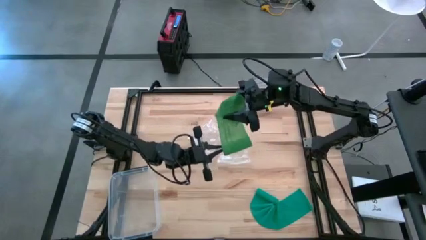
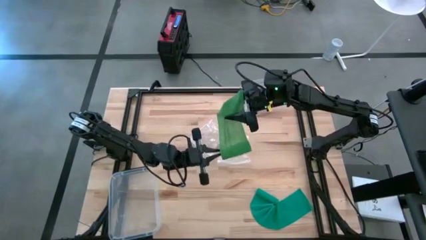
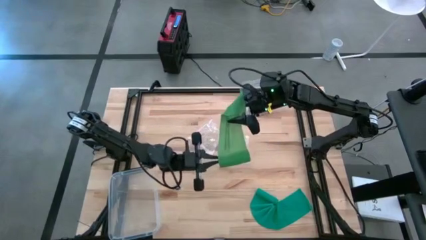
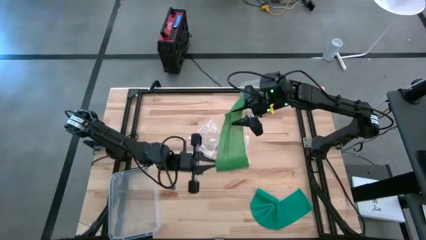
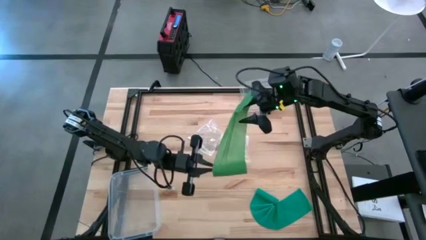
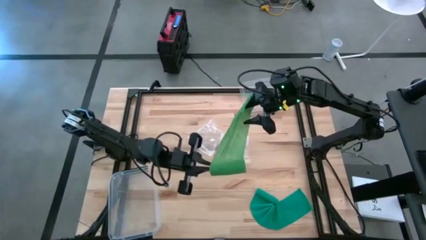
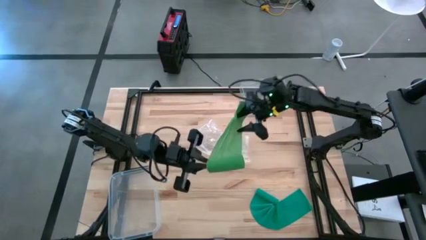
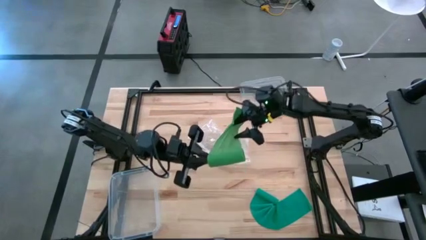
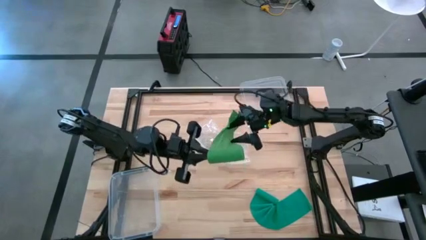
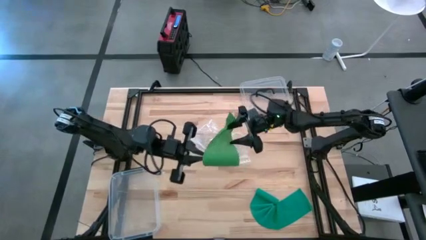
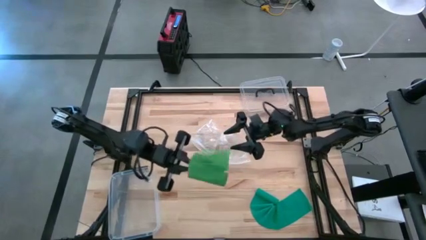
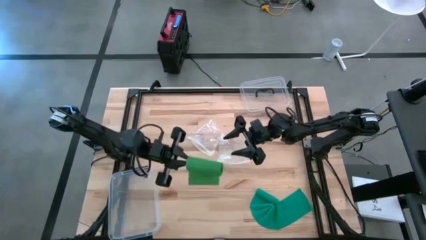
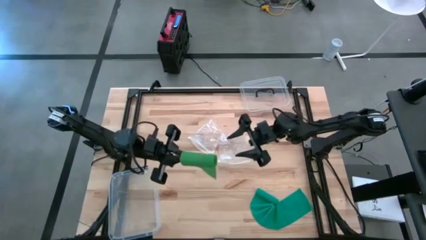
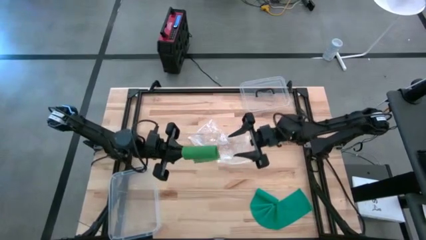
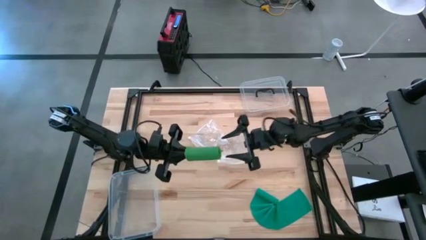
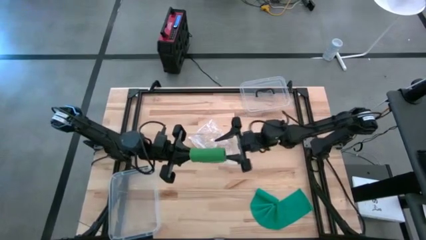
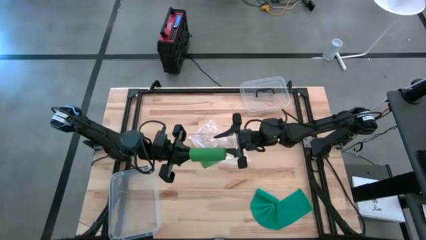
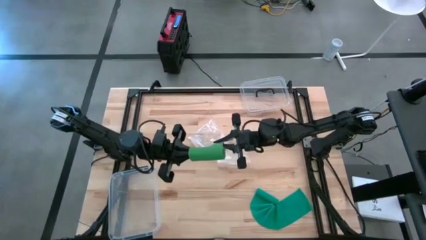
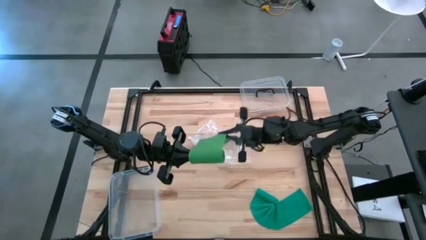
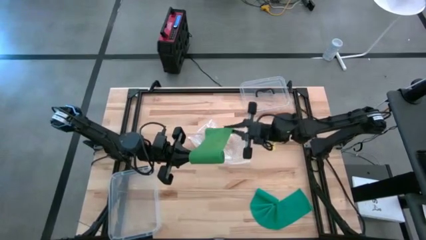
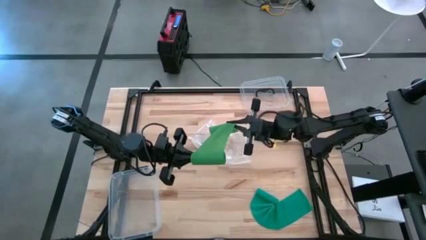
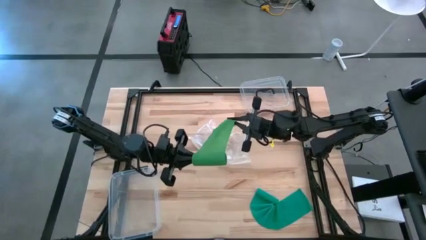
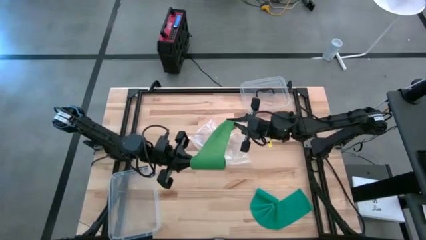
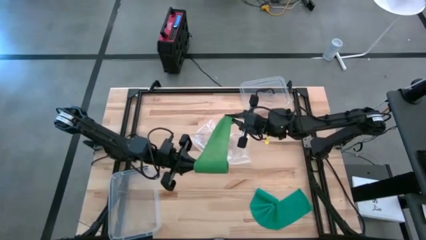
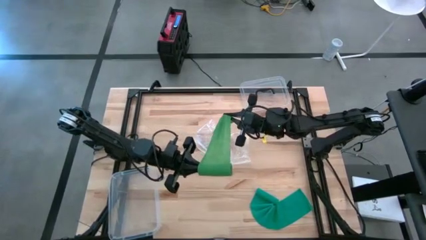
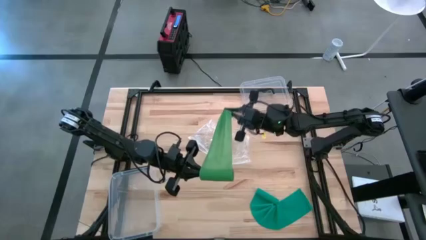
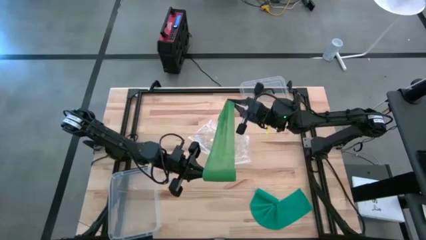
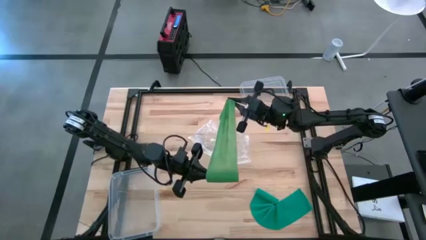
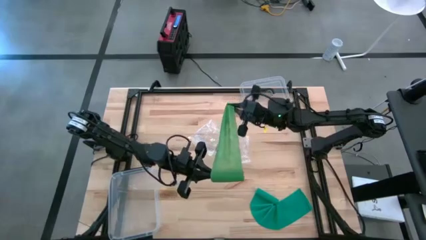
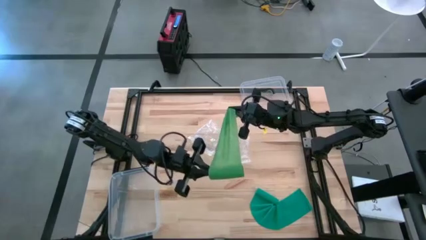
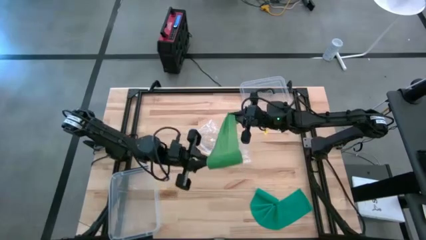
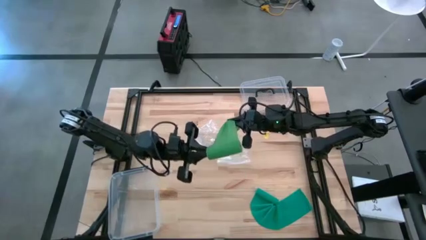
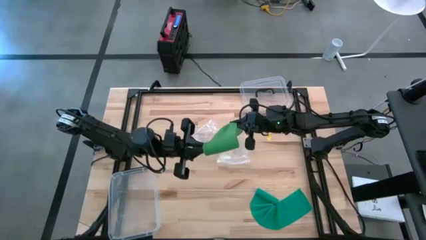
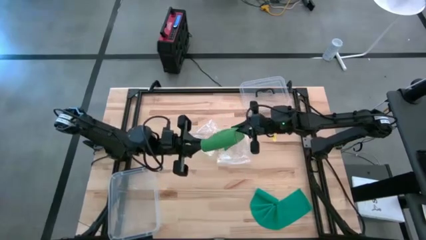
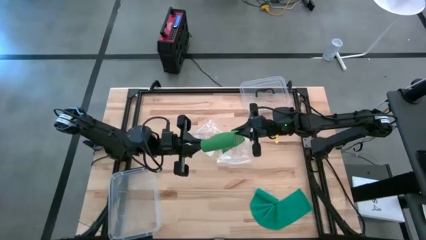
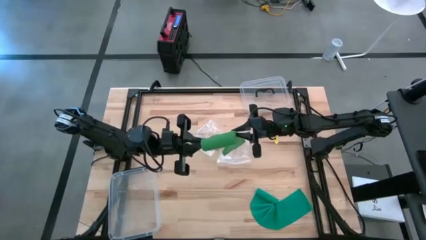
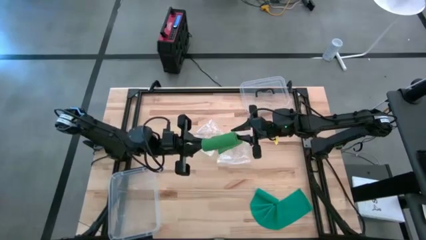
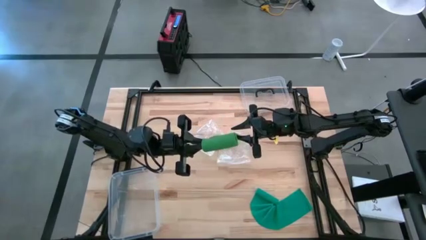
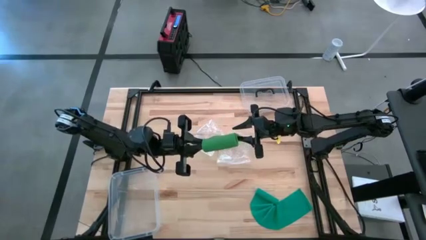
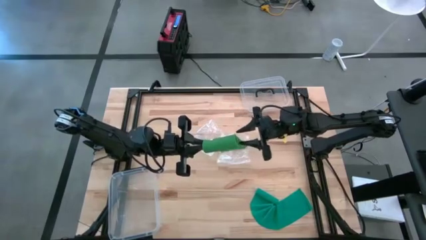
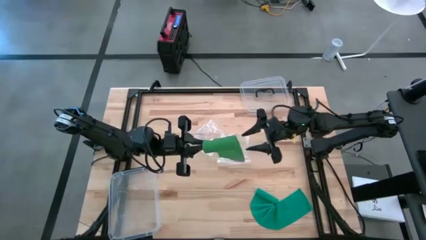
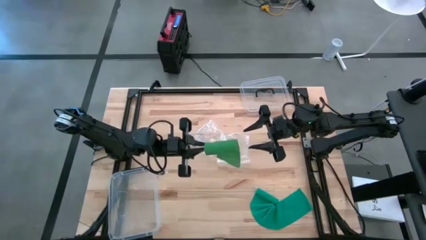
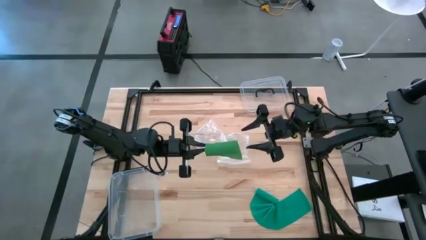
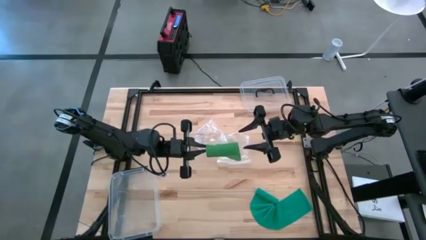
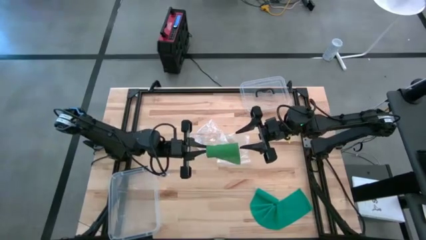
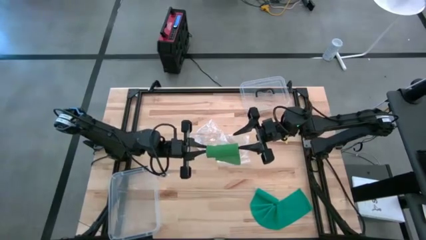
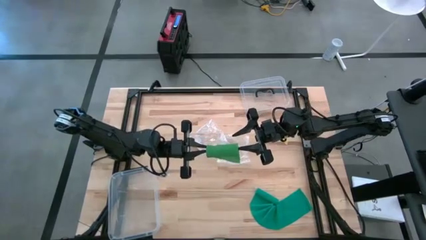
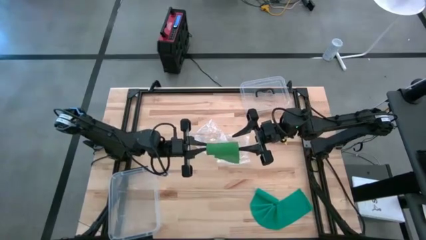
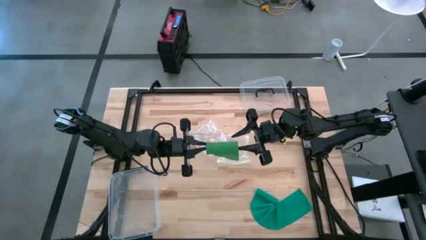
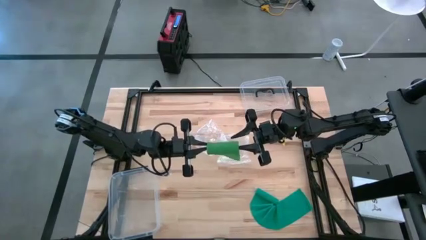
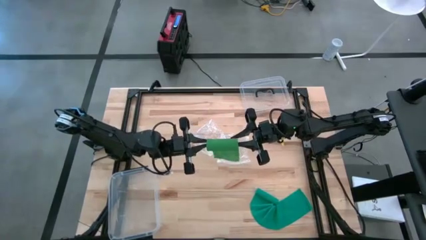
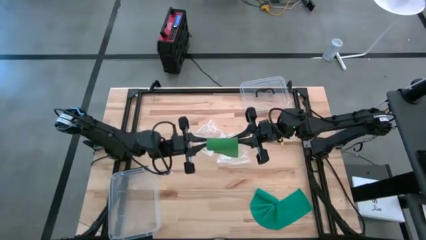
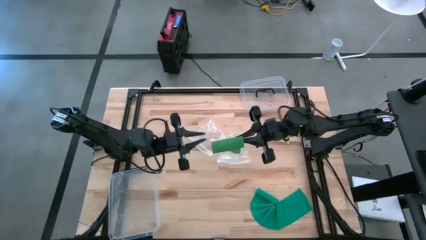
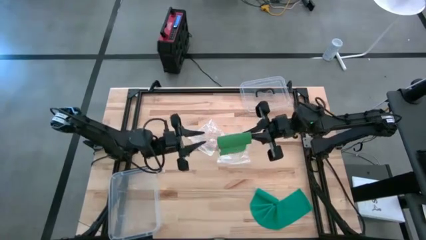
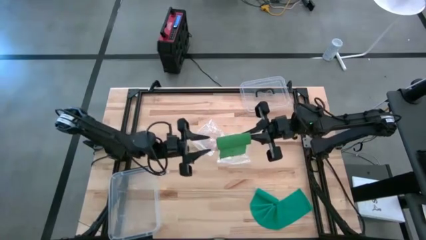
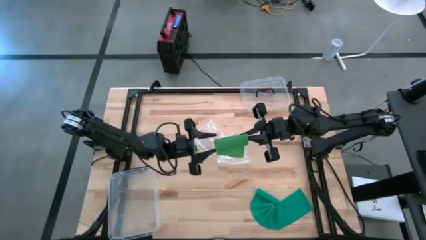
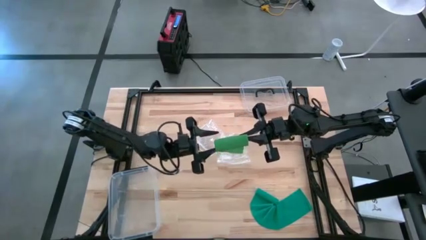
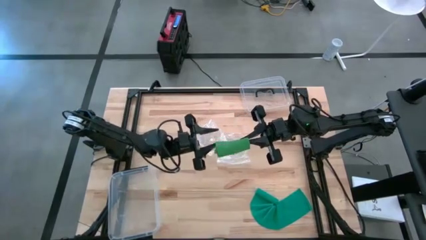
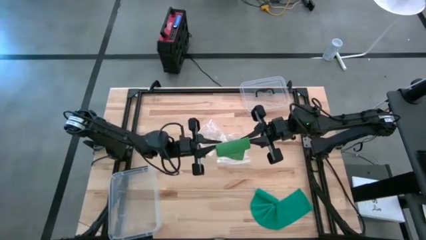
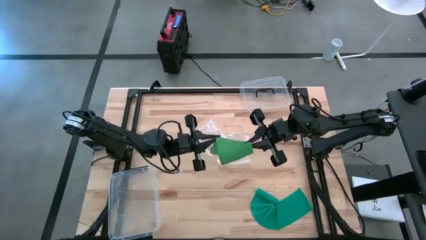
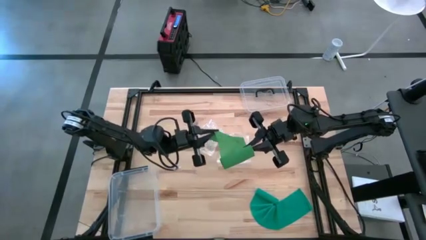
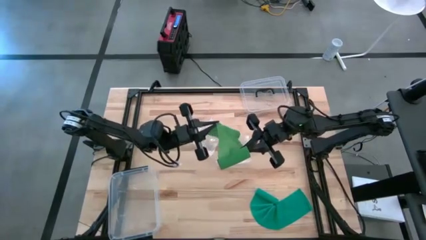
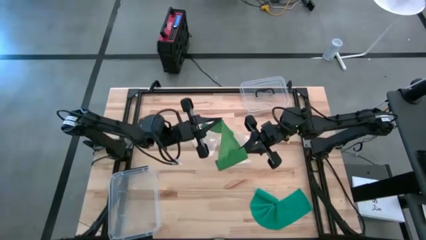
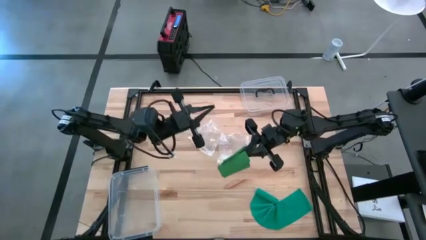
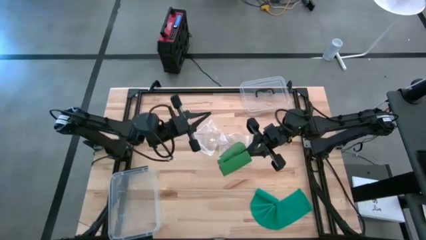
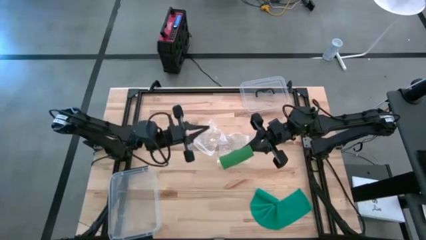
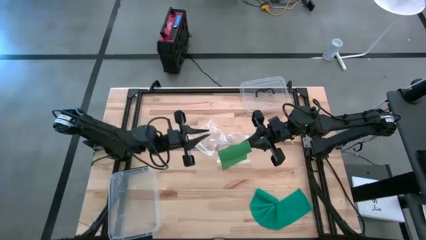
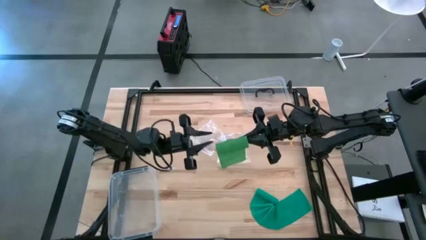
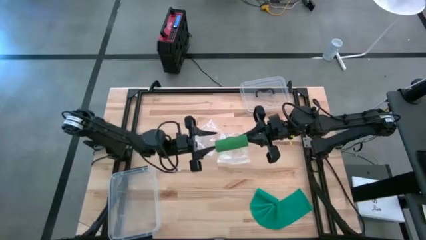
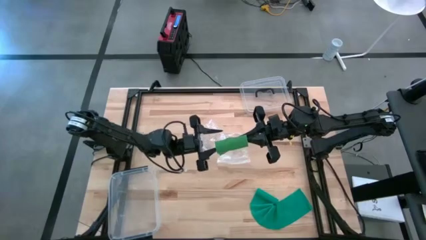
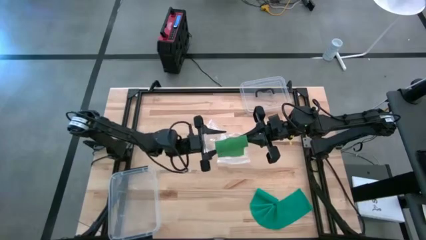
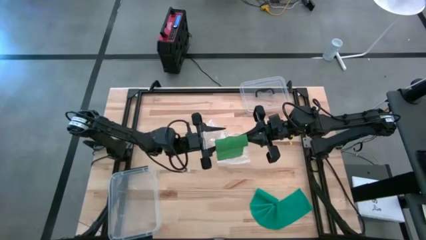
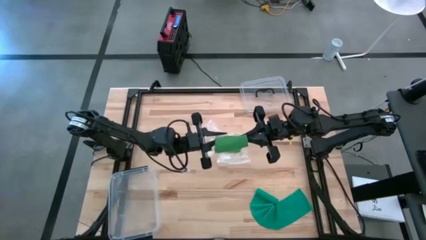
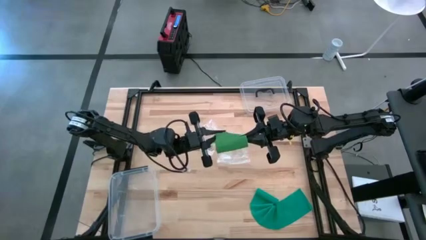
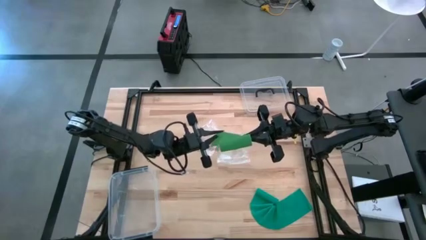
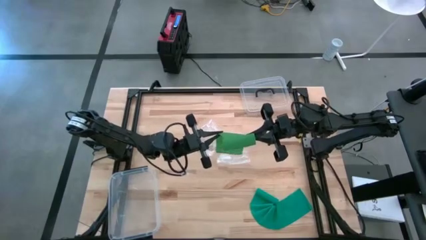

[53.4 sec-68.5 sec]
Task: Roll bandage
Roll the green bandage

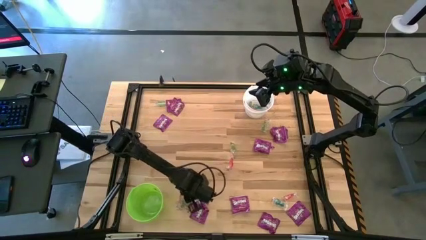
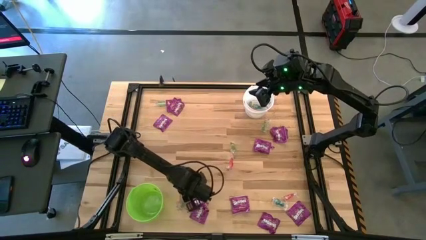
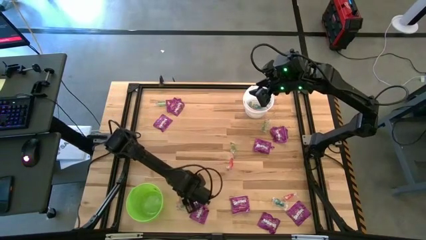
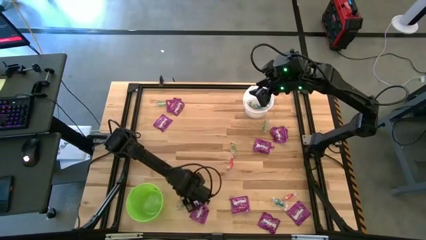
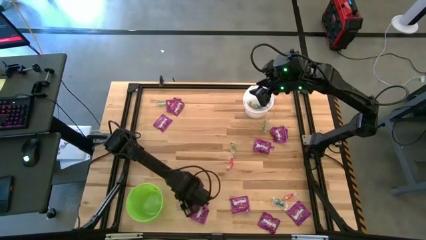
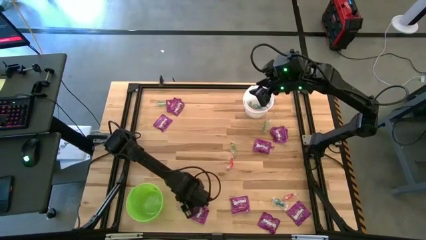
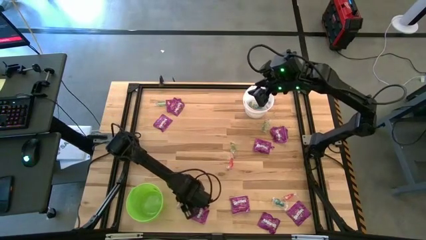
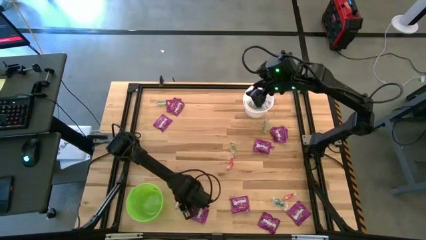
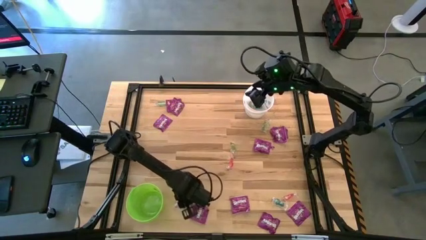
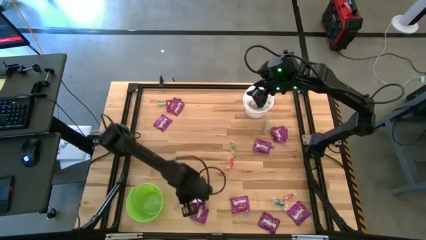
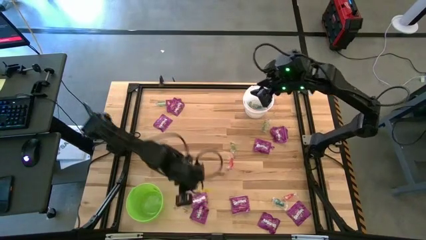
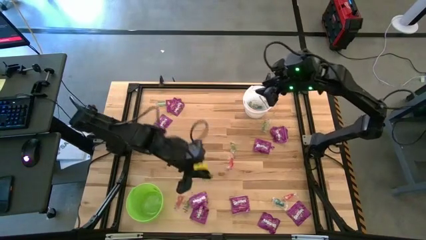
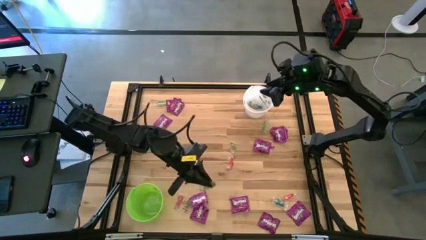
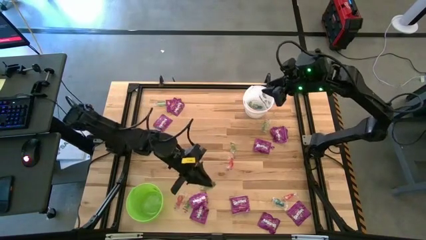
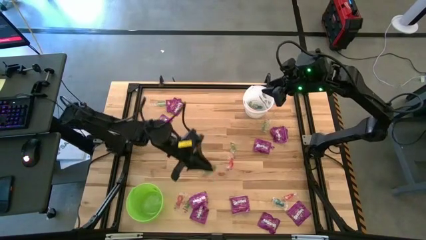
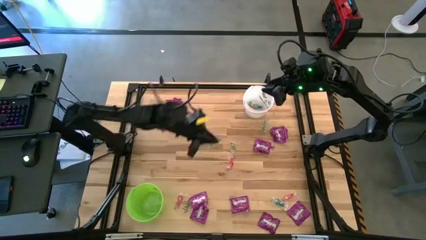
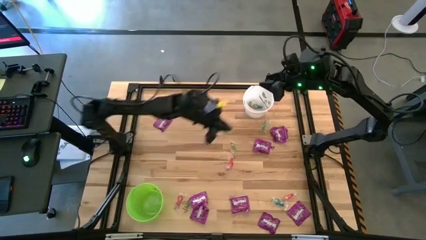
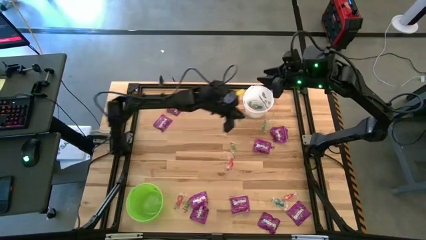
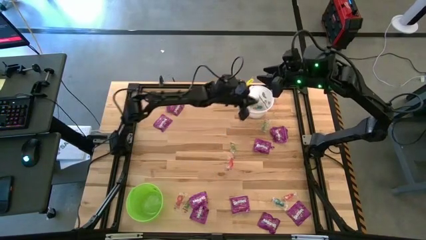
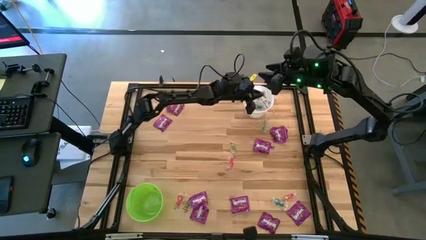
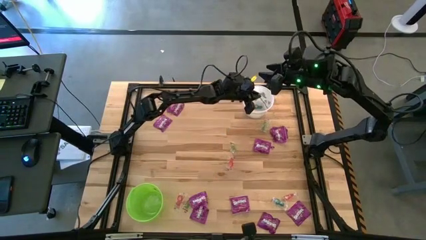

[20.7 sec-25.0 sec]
Task: Sort candy by brand, put in halloween buckets
Put the green gummy into the white bucket
